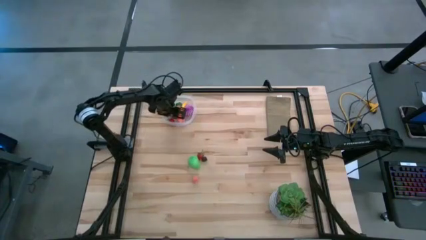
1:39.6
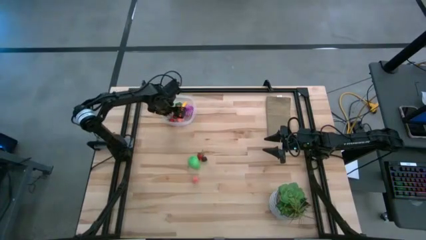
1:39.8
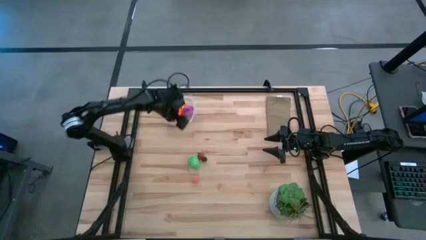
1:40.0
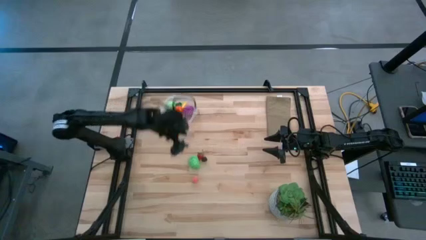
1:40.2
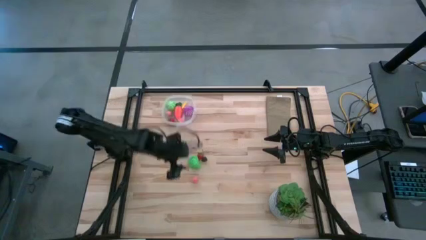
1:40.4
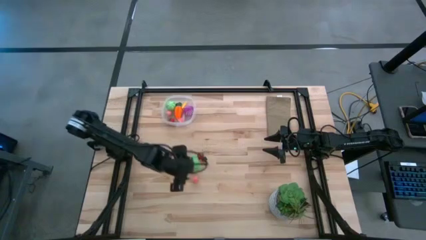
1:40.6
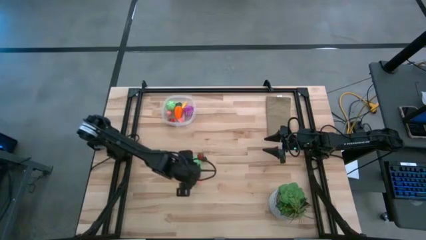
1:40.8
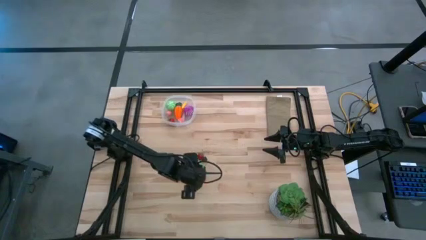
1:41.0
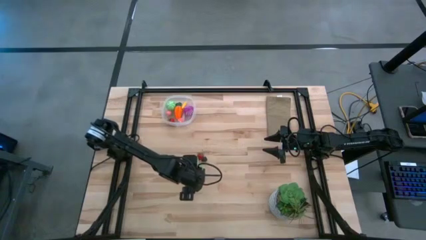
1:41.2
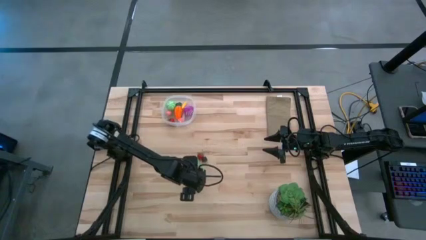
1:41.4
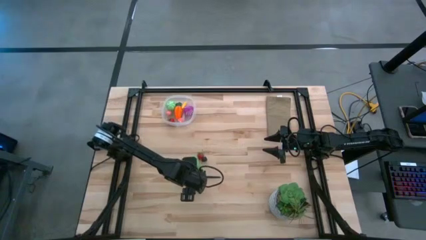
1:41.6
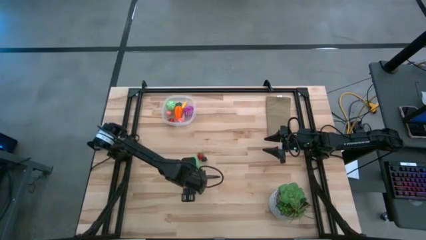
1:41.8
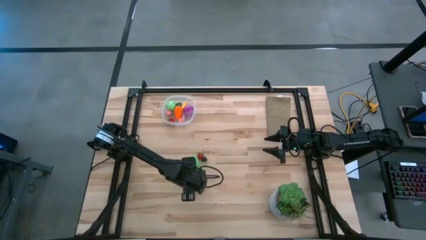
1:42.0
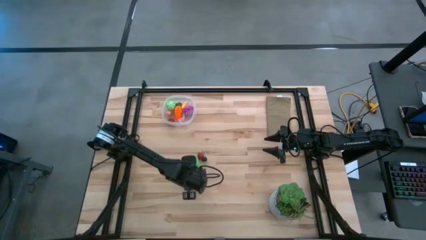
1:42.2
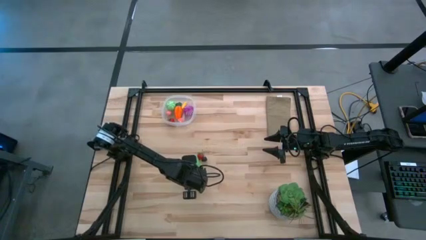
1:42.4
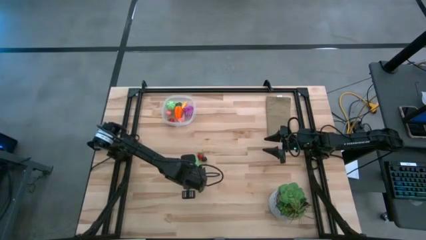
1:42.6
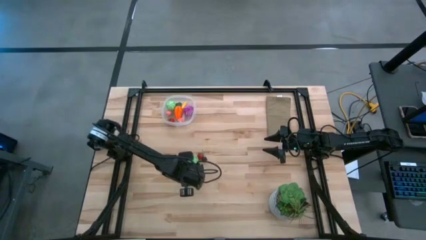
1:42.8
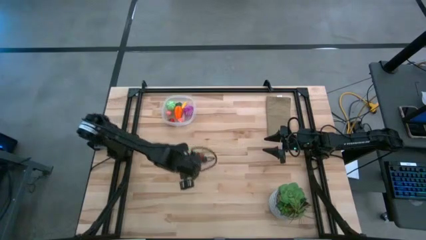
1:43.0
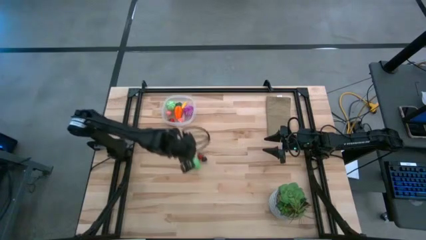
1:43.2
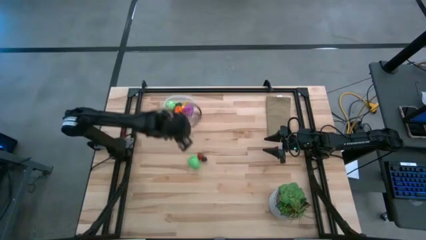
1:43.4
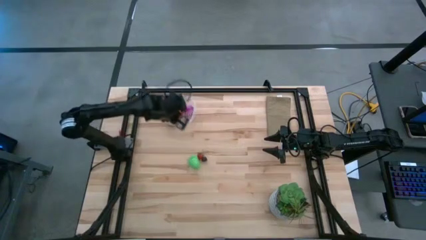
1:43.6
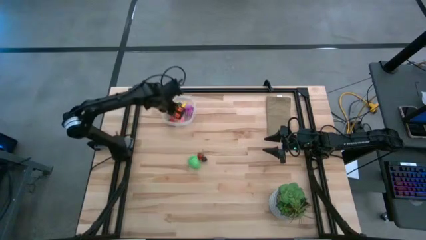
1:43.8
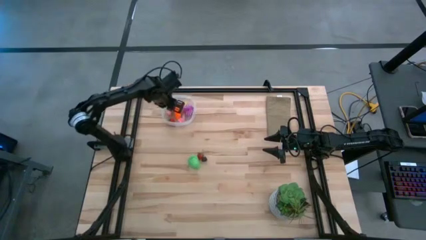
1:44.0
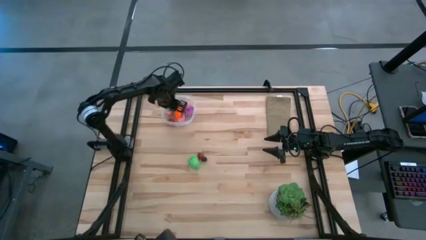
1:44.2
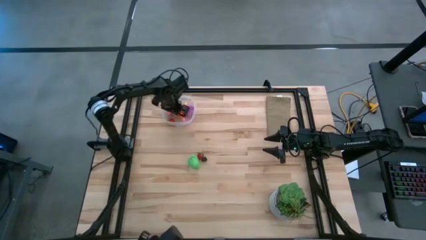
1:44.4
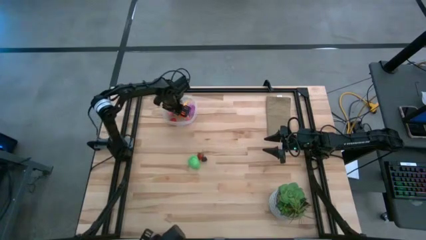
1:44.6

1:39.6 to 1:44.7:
Task: Pick and placing Produce into tupperware
Put the peach into the transparent bin

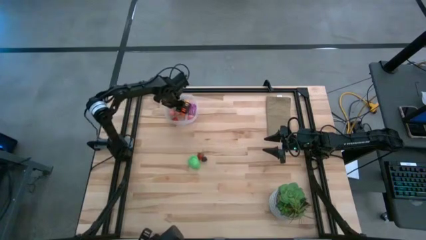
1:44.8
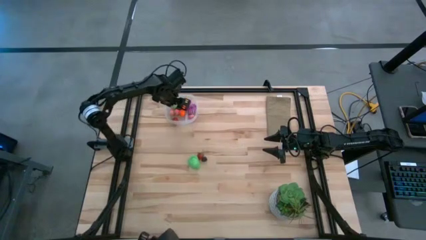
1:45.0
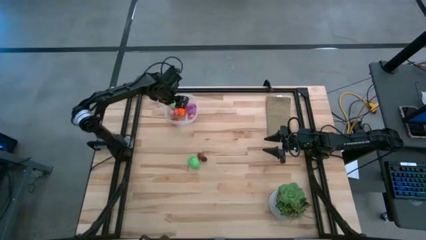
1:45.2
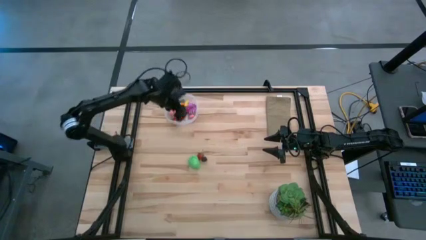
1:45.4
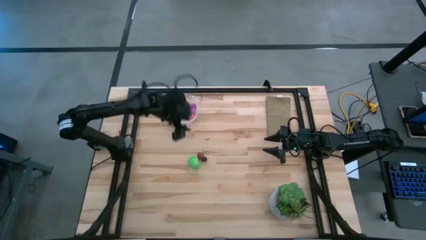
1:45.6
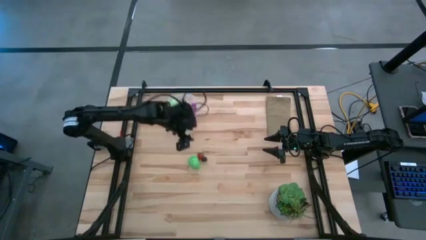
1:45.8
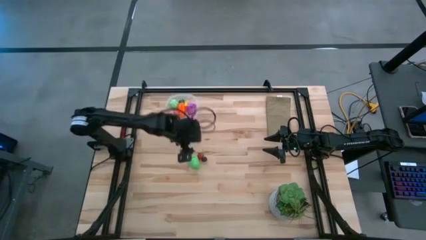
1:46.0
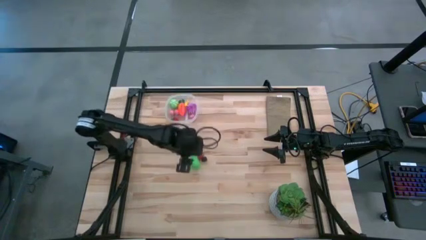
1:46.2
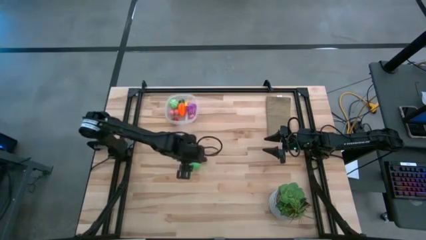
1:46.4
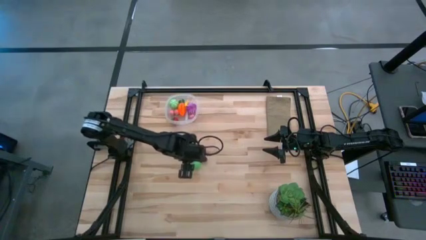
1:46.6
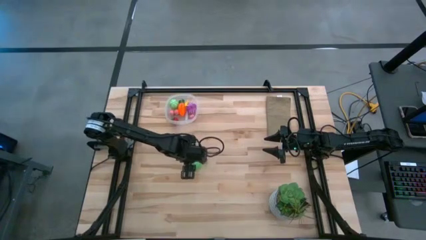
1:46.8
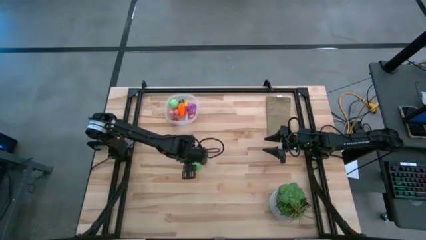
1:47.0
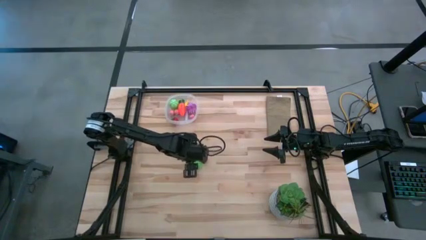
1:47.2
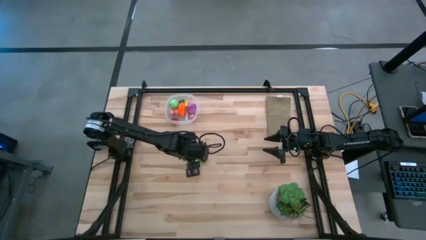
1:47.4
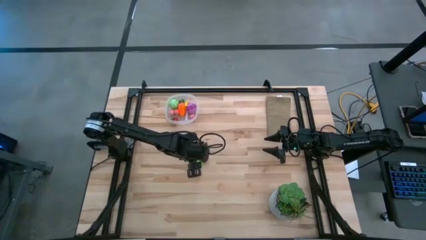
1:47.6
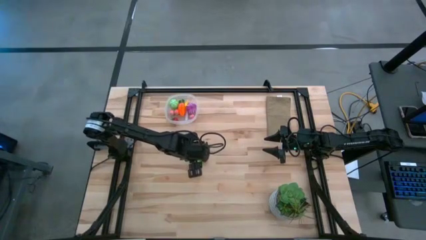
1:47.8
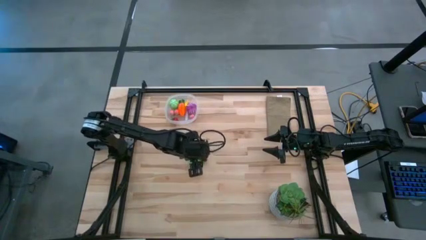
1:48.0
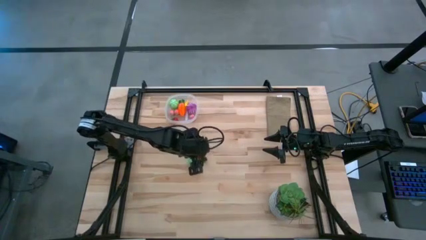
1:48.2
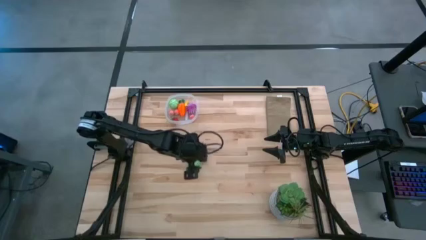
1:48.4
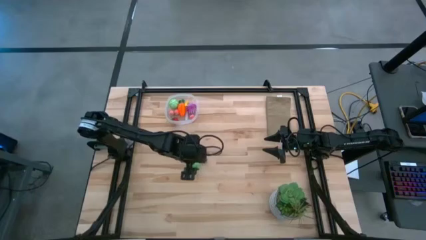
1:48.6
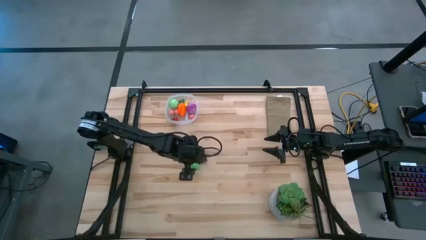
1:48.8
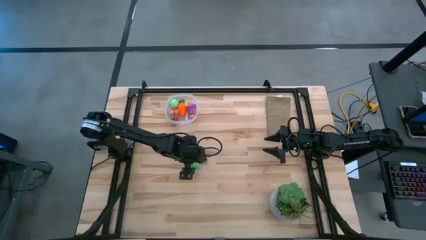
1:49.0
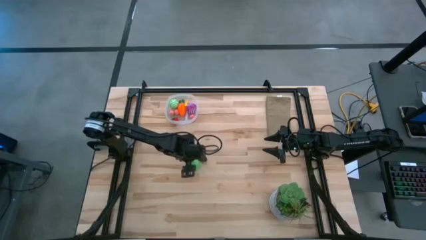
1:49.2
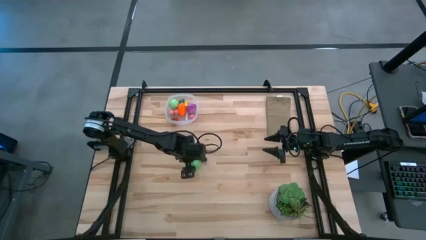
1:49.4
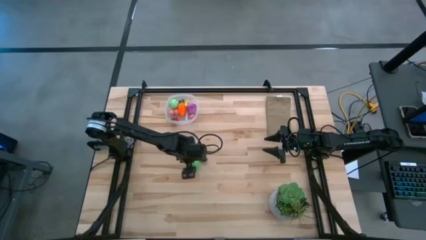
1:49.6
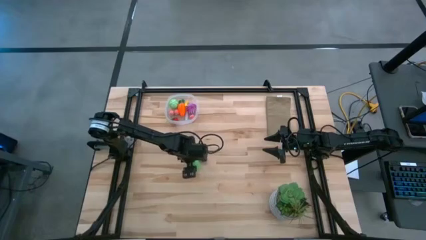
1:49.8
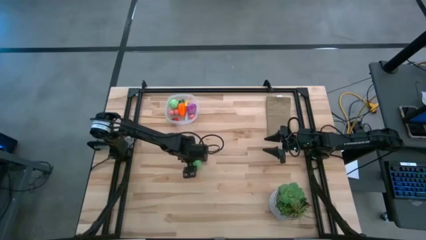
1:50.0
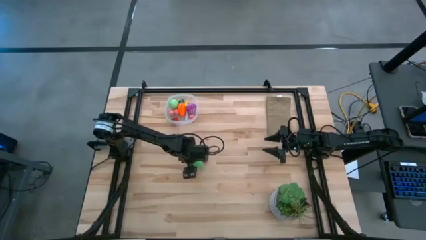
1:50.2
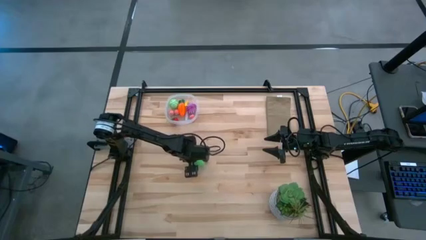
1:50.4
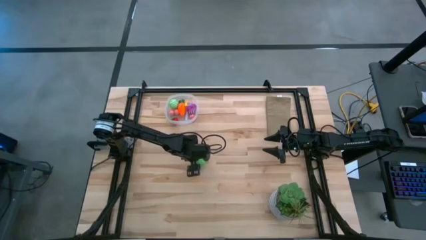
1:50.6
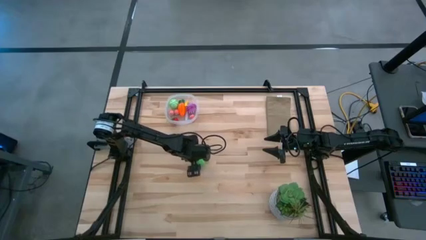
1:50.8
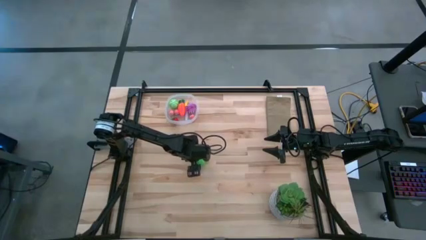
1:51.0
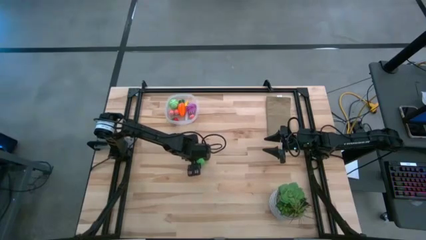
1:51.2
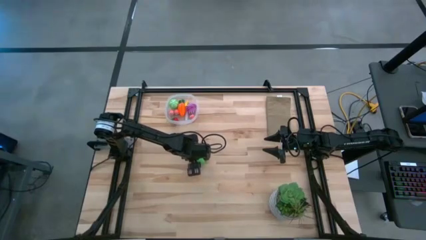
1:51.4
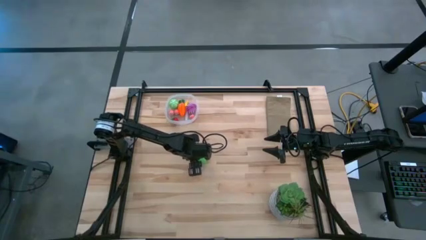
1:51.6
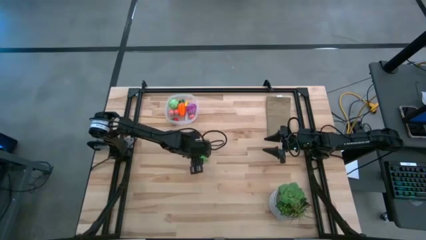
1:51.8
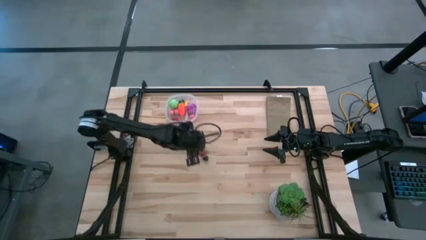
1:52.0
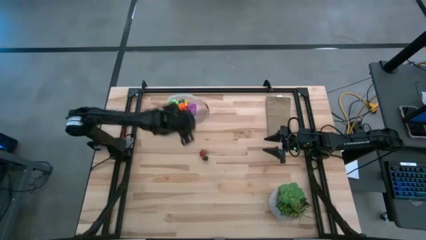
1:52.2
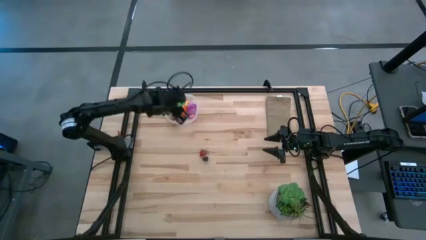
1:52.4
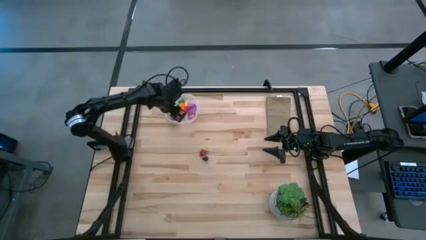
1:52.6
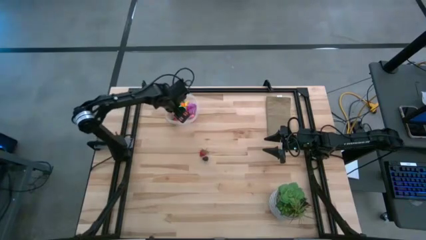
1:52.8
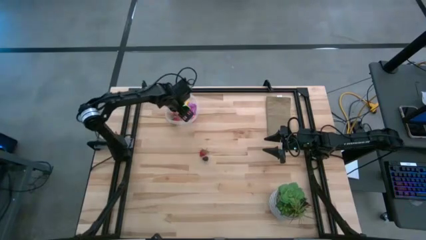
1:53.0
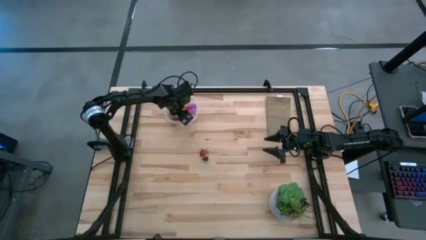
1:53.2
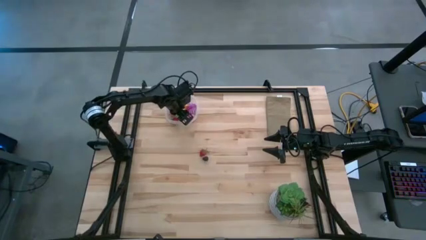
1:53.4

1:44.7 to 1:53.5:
Put the pear into the transparent bin

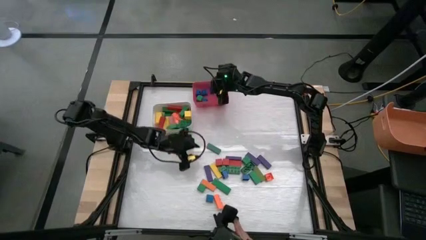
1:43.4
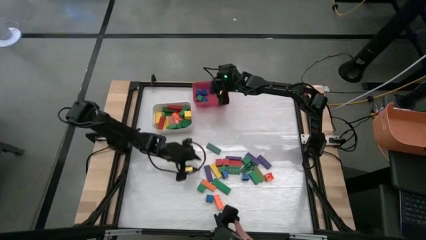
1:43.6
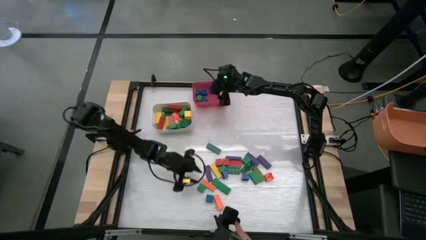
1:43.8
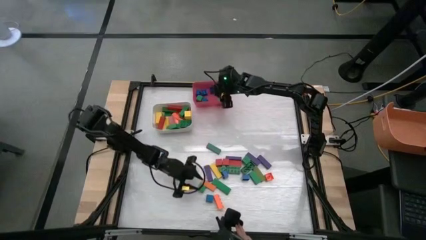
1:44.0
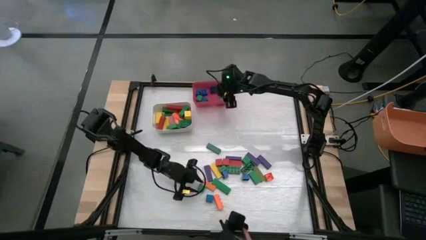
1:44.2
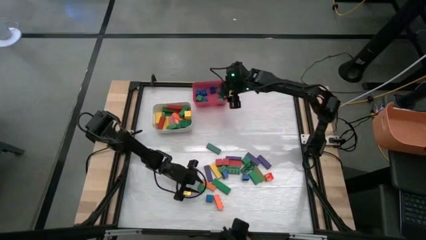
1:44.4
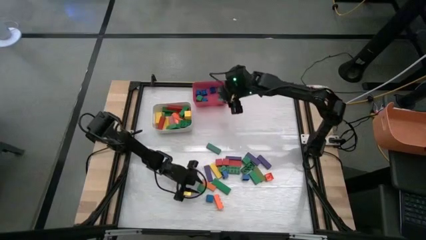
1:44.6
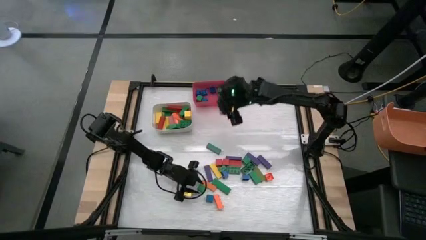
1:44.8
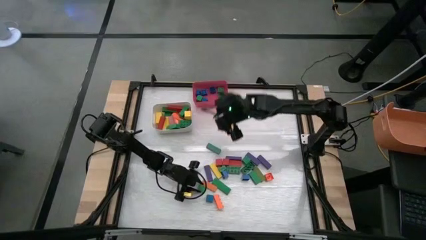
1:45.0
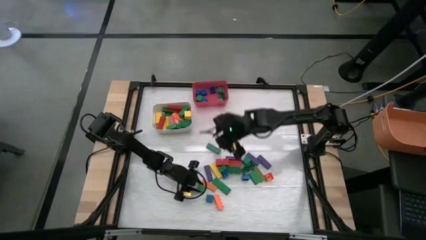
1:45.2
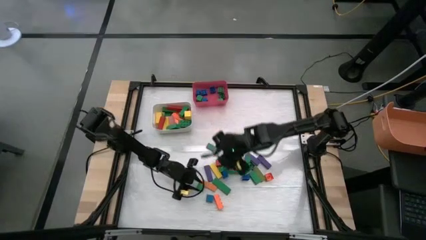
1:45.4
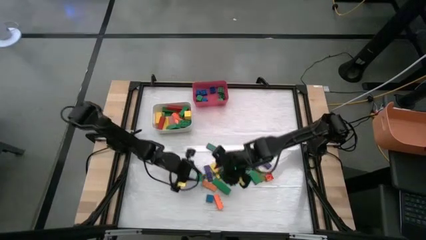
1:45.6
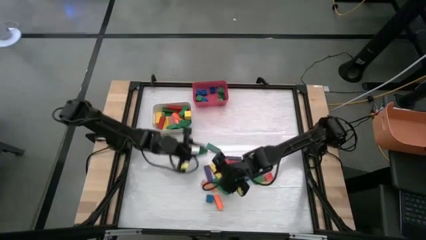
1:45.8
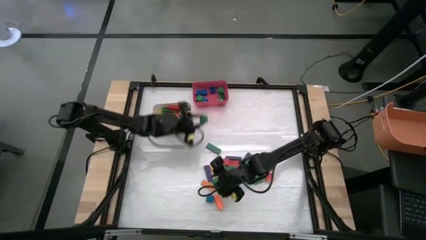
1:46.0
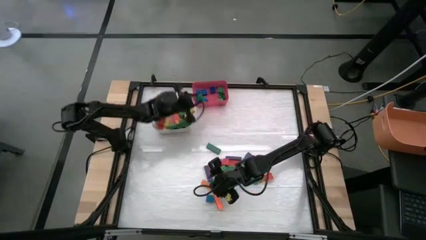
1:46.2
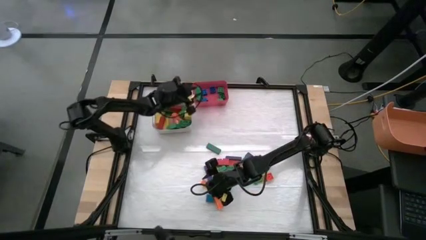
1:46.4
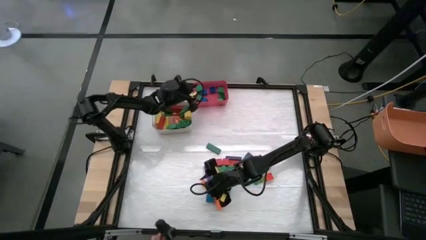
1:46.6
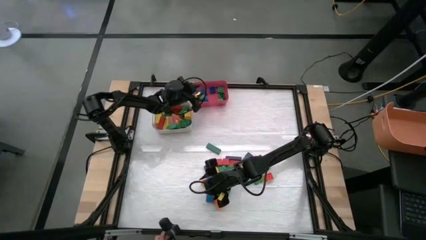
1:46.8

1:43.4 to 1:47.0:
Task: Sort blocks by size
Put the small green wooden block into the red bin
